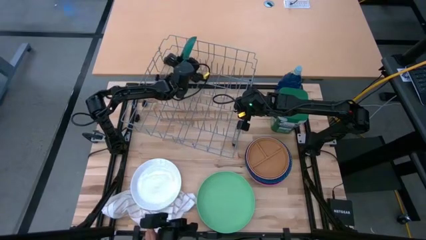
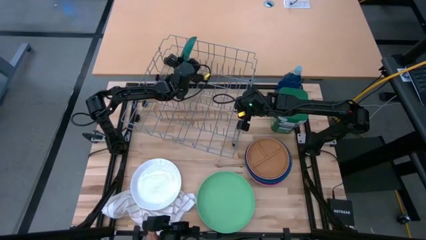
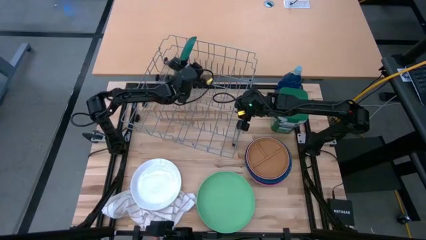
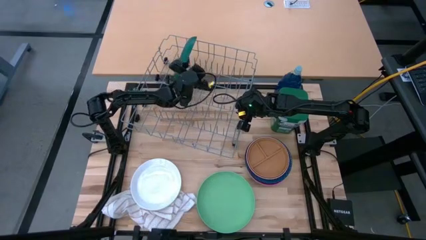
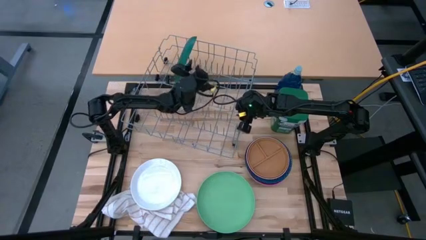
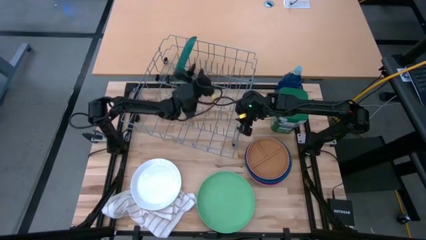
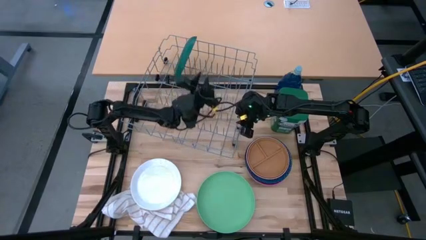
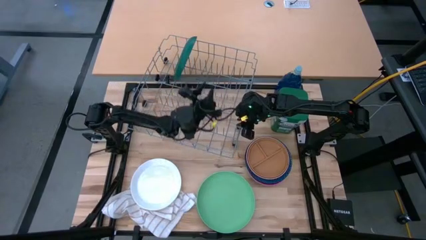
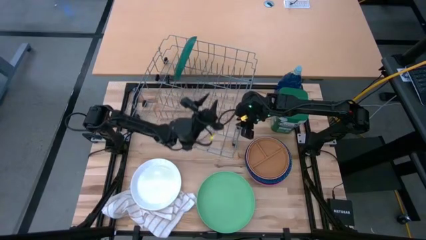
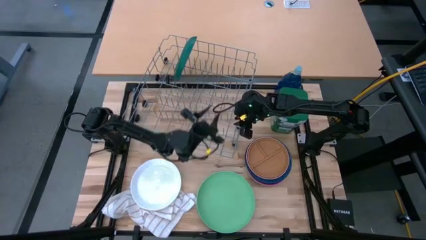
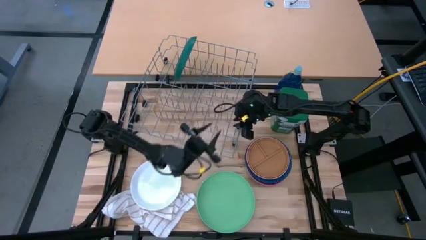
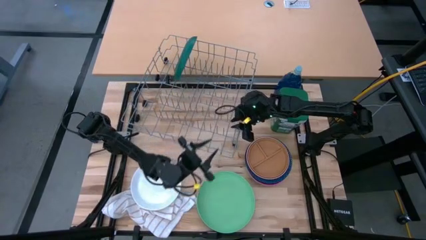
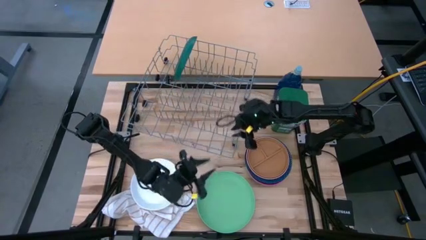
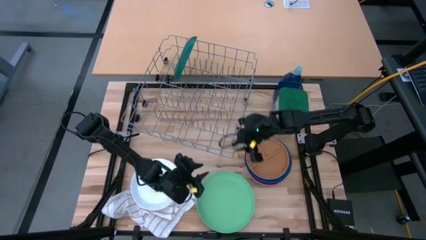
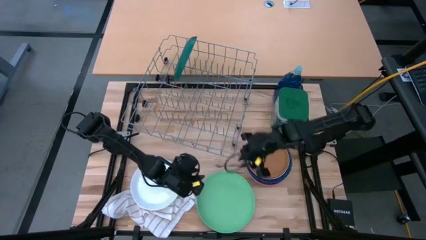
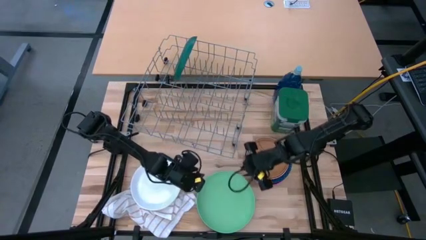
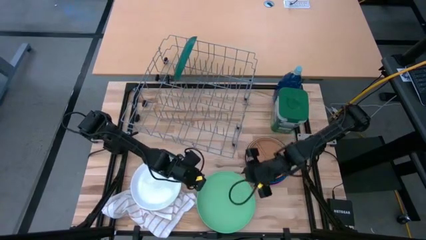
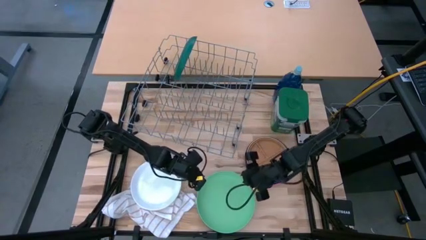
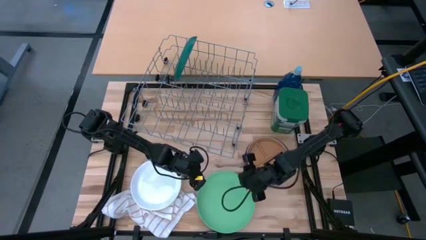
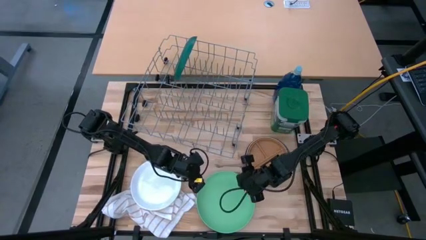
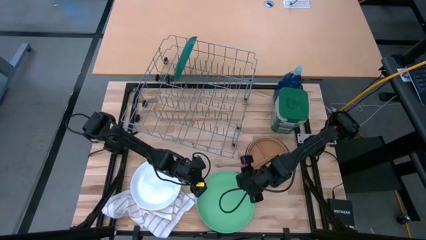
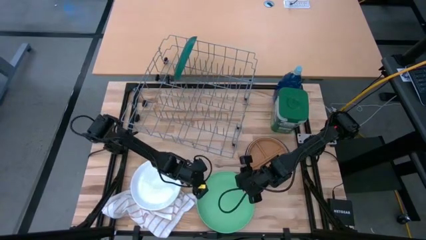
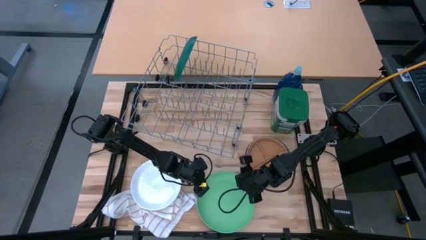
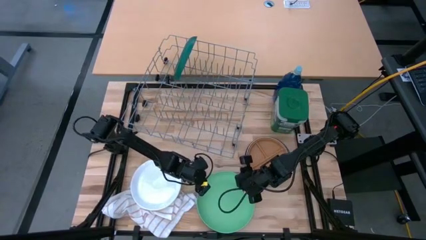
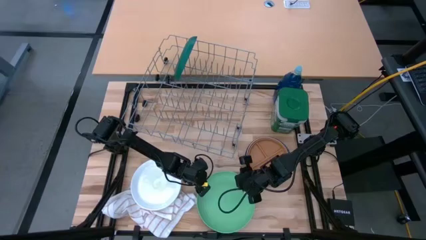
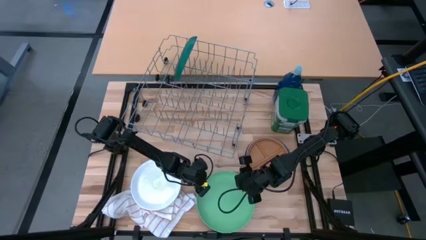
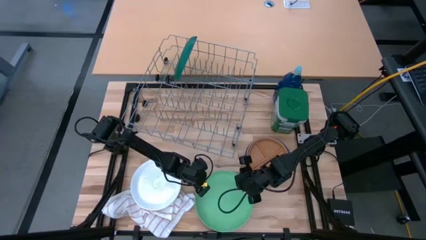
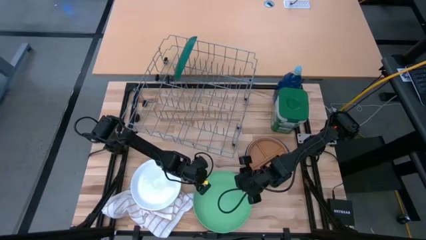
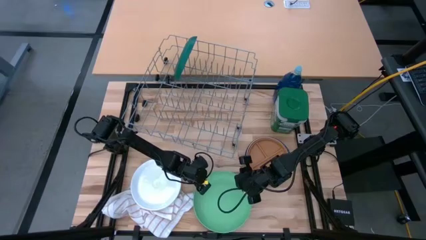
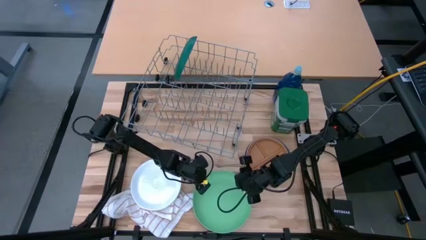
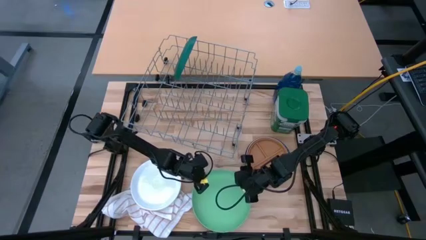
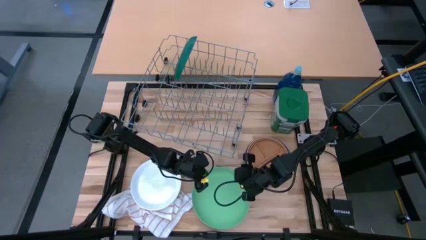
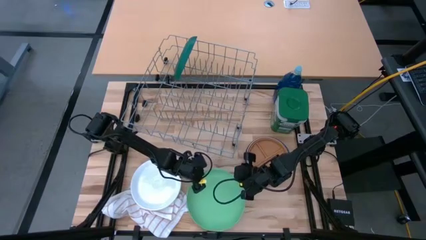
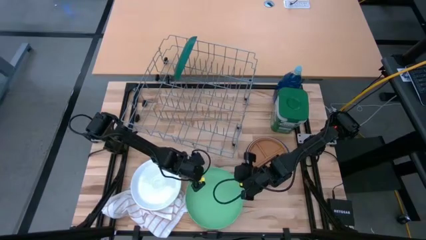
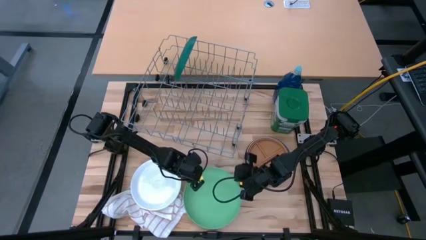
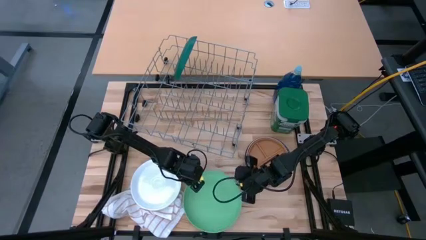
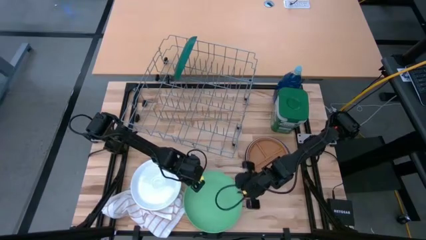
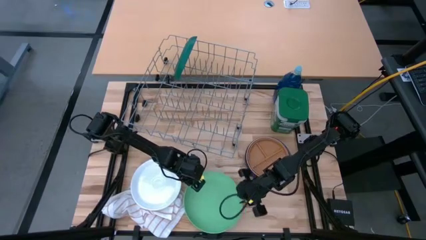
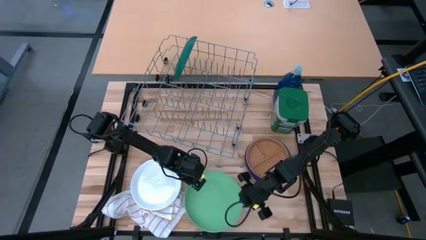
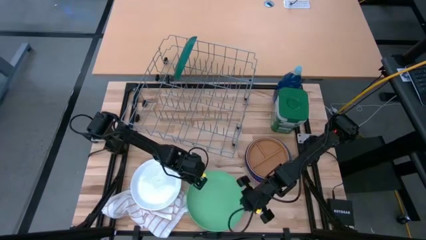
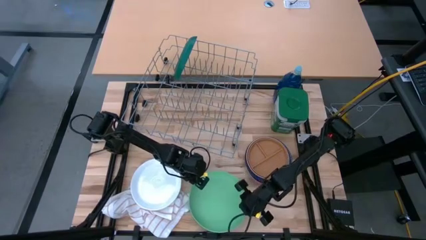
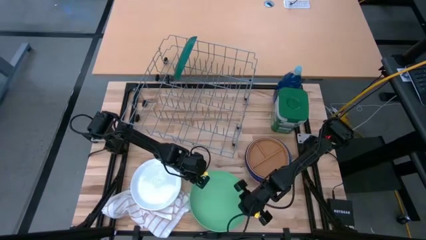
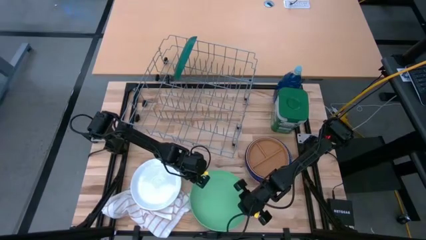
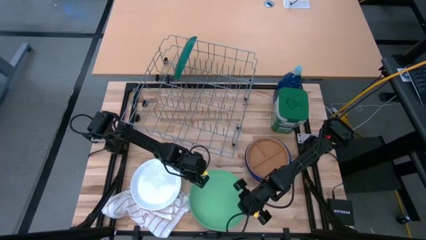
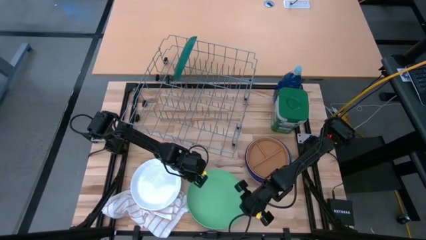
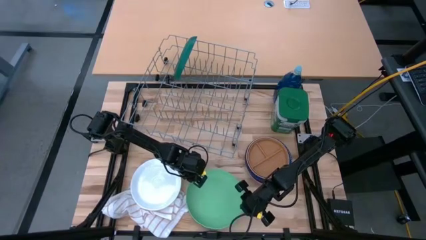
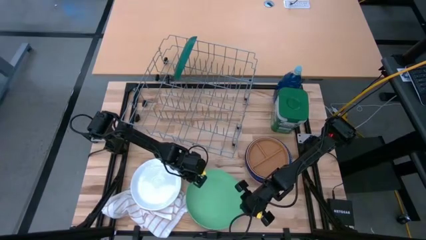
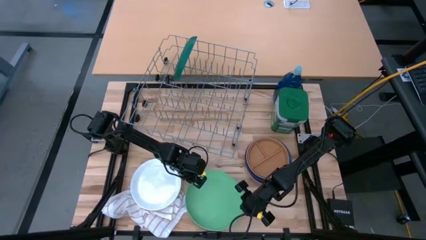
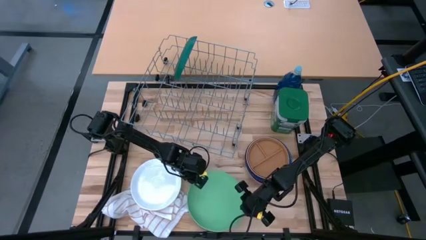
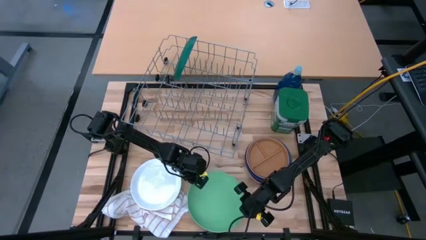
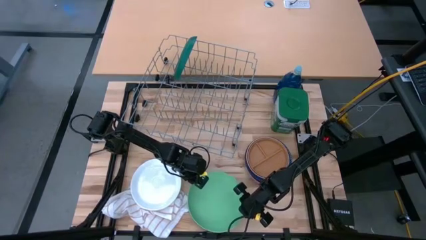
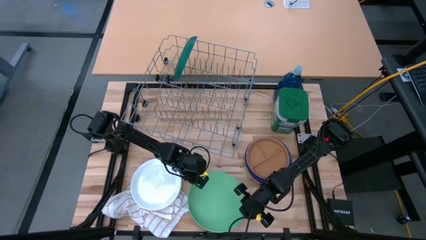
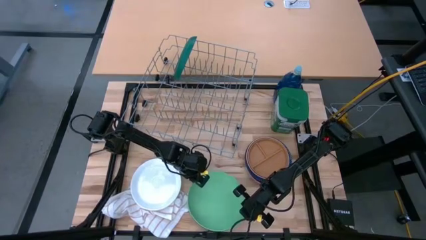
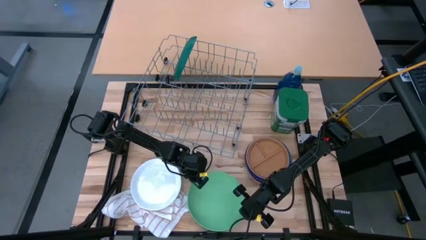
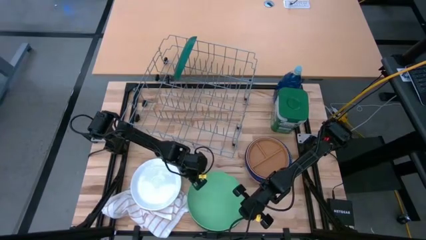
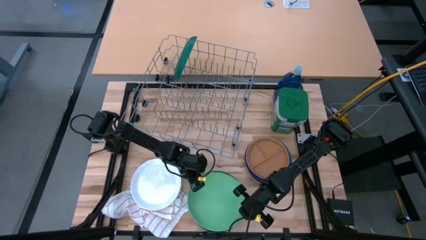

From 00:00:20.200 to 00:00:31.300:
Task: Sort dishes
Put the green plate in the dish rack
